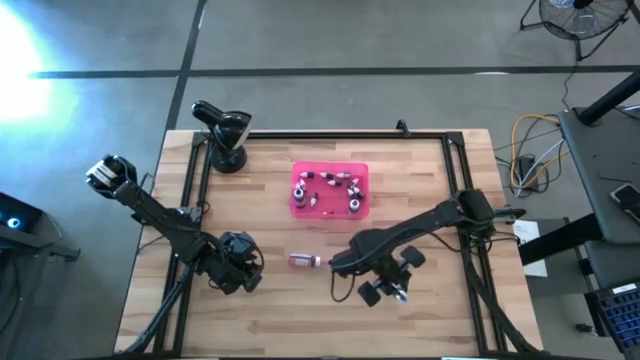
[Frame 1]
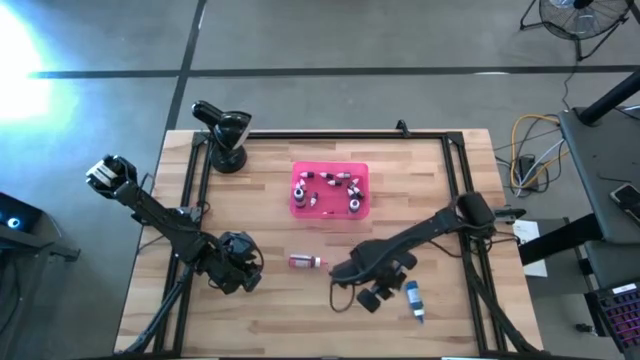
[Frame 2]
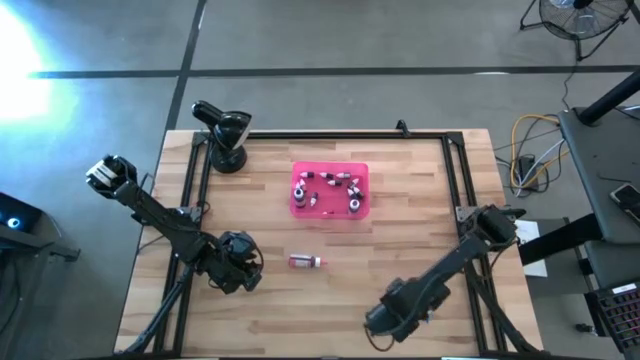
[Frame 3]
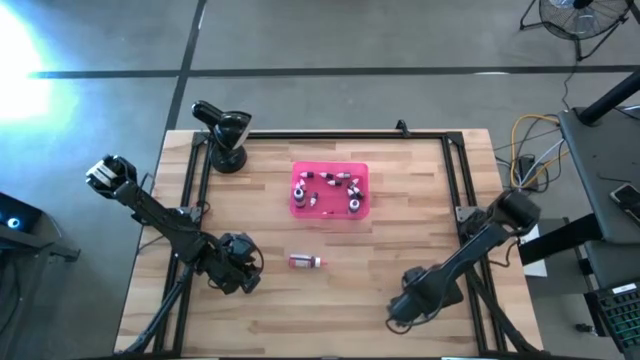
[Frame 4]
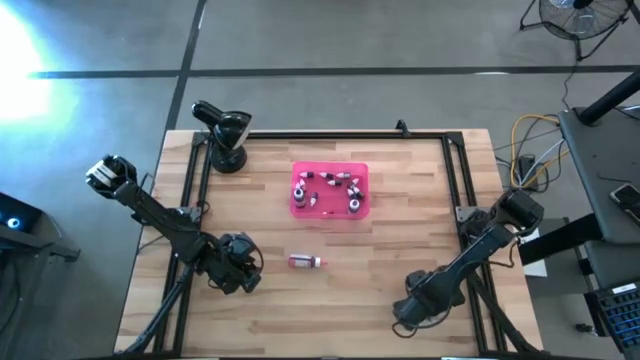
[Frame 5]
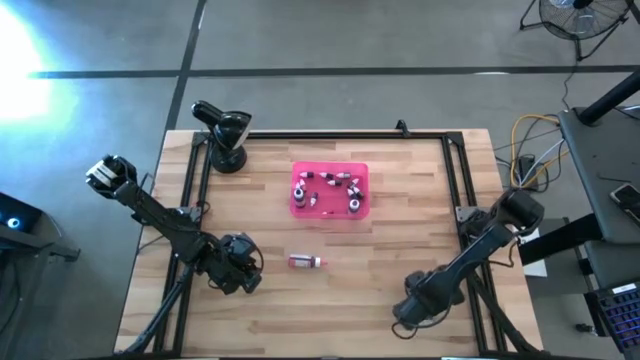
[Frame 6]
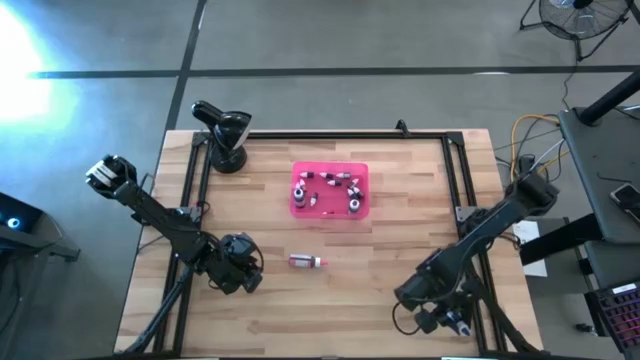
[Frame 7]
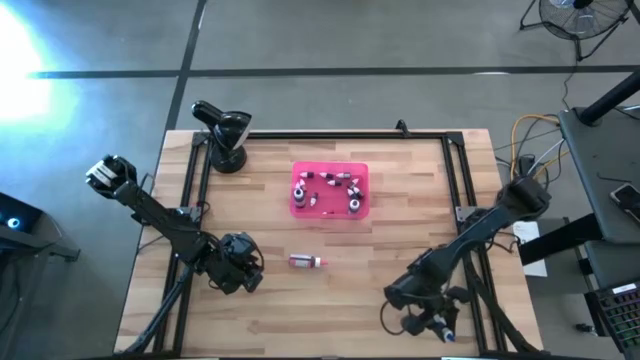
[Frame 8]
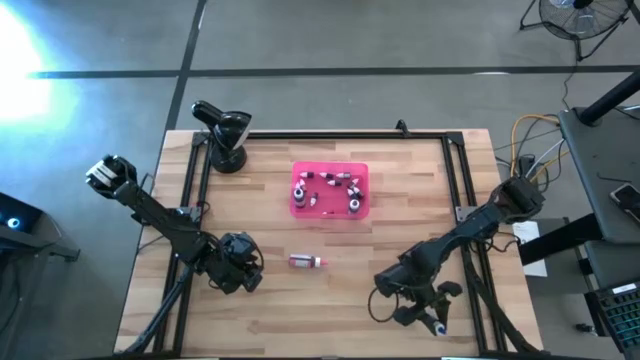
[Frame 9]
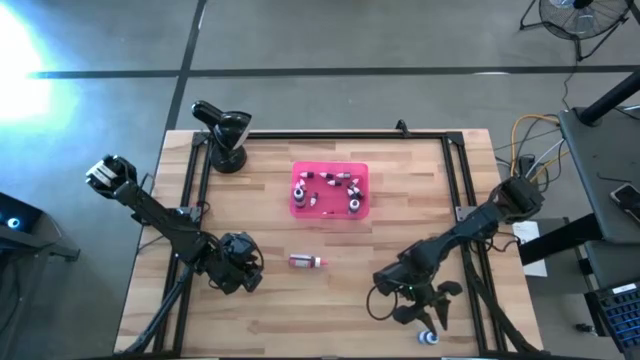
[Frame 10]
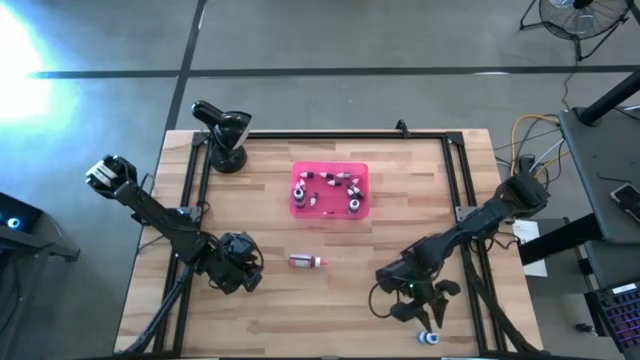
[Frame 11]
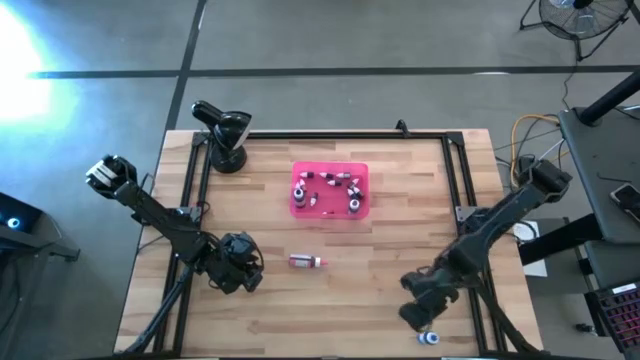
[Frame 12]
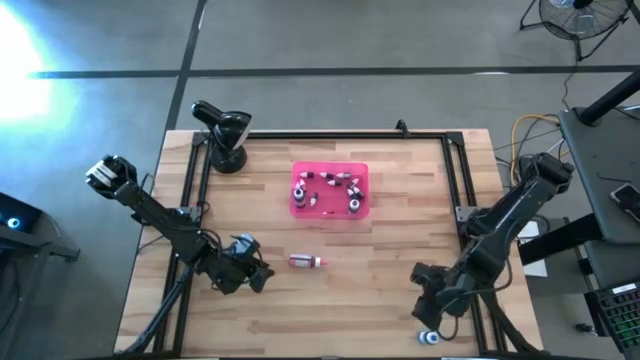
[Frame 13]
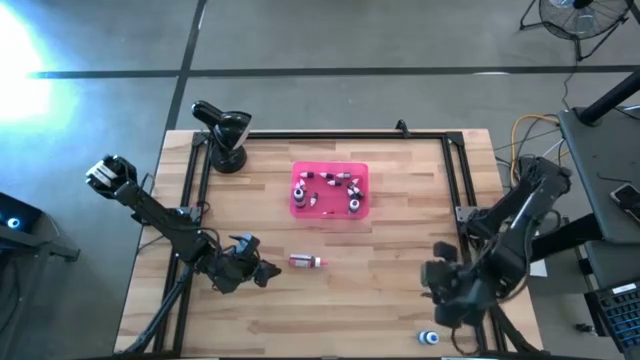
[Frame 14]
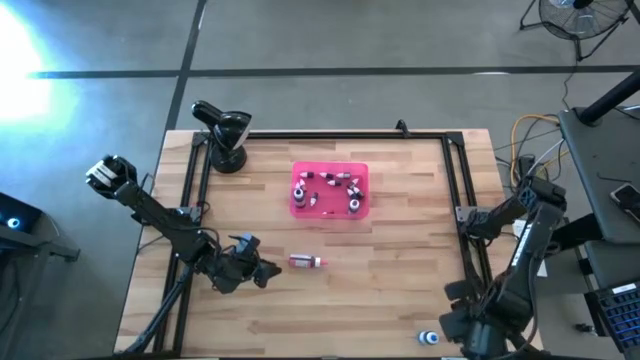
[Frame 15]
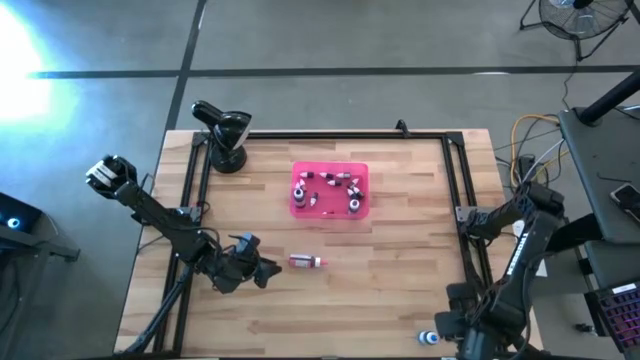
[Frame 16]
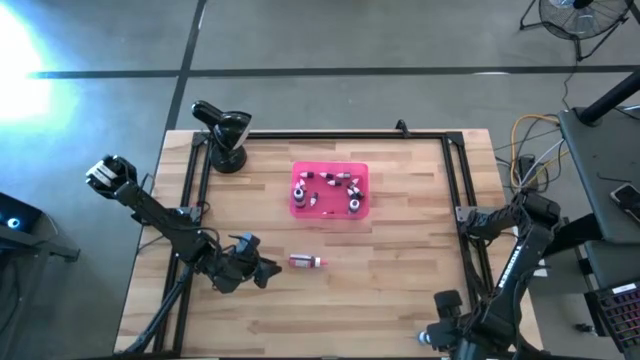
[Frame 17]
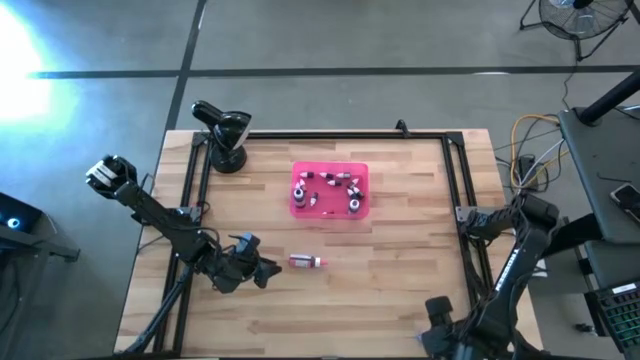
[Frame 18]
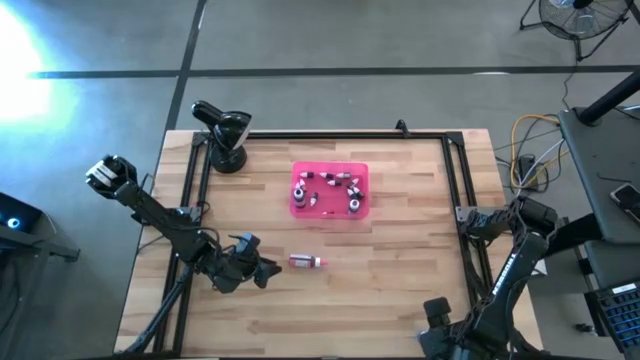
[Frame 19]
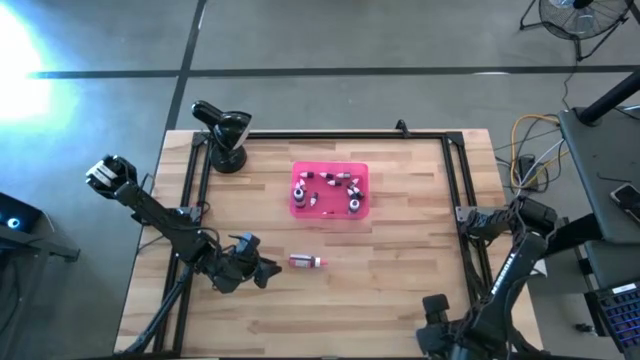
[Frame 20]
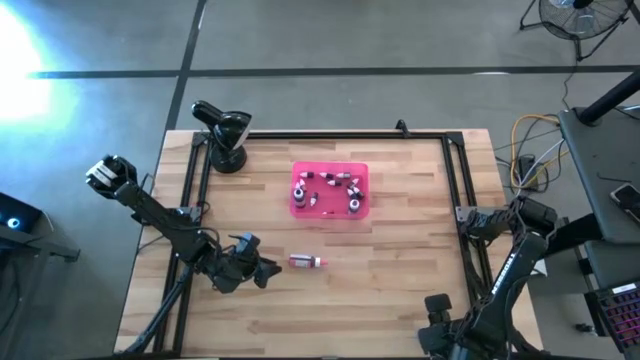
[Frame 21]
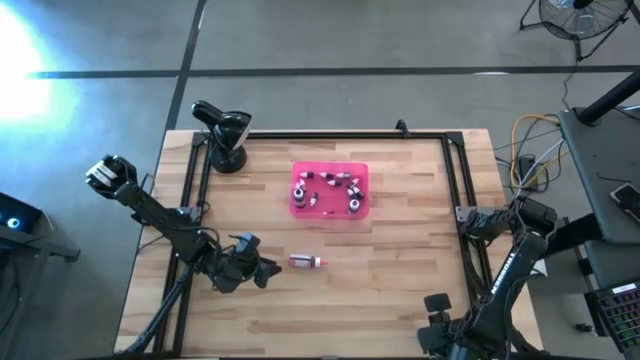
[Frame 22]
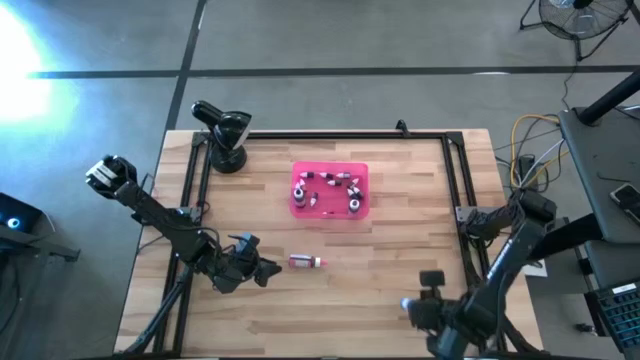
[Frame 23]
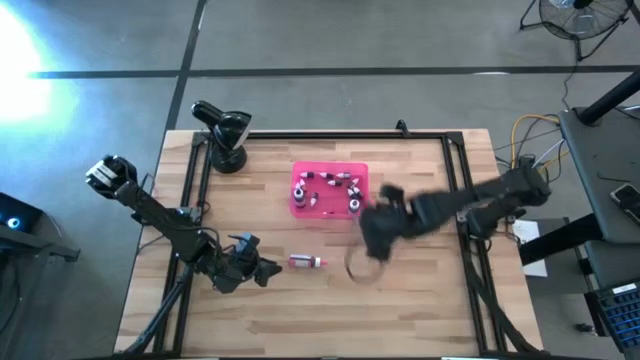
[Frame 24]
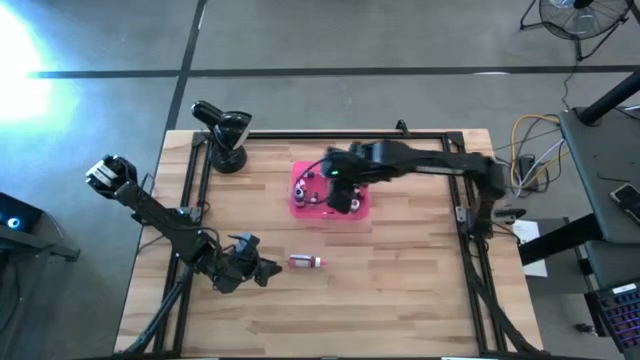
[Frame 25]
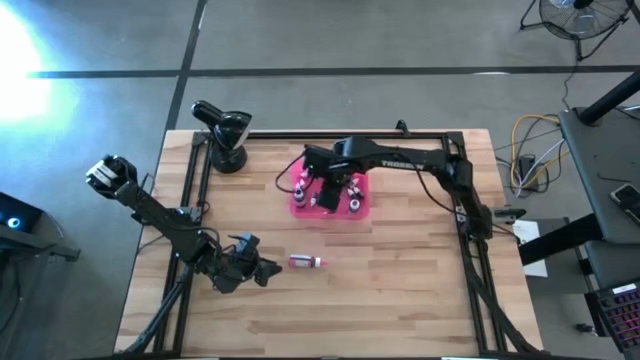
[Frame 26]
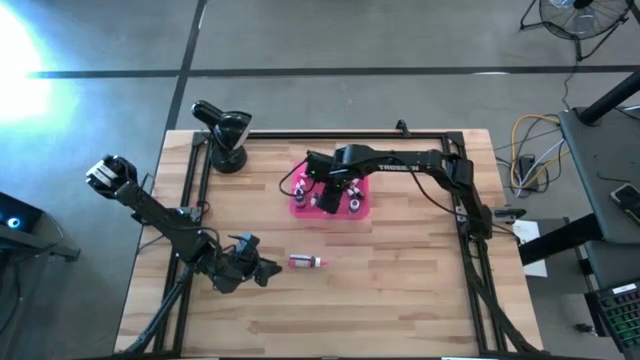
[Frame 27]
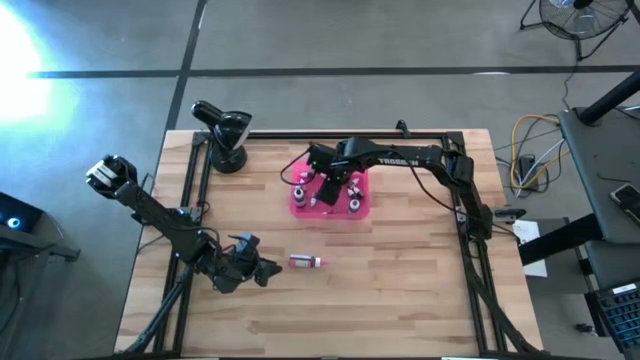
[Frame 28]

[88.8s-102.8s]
Task: Pick & Place food coloring
Put the blue food coloring bottle into the pink bin

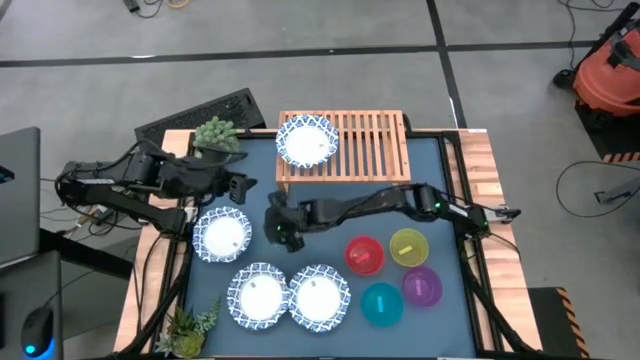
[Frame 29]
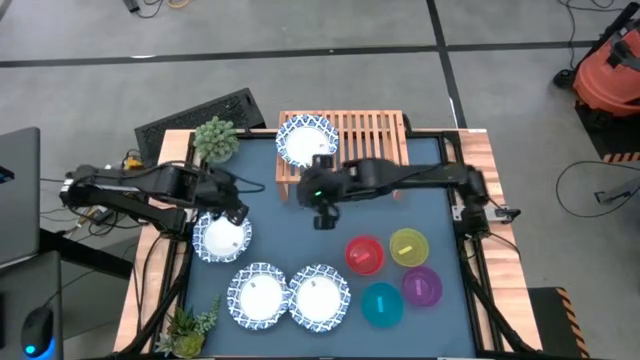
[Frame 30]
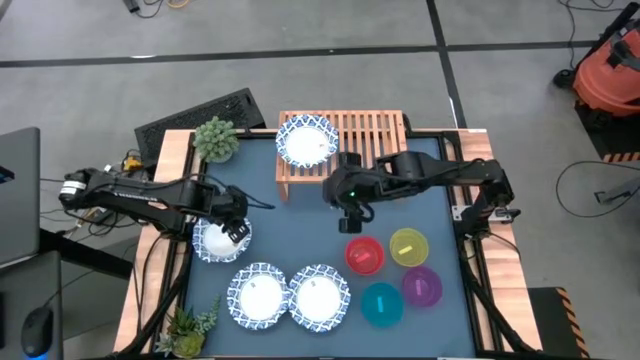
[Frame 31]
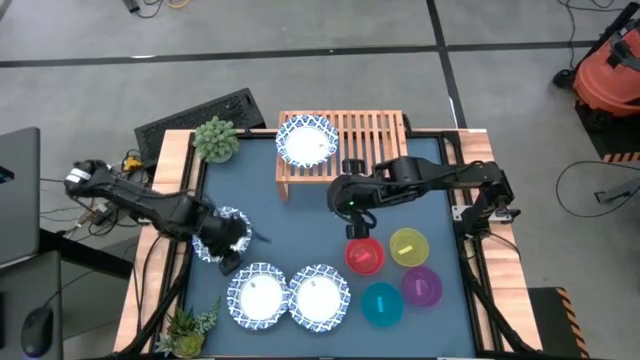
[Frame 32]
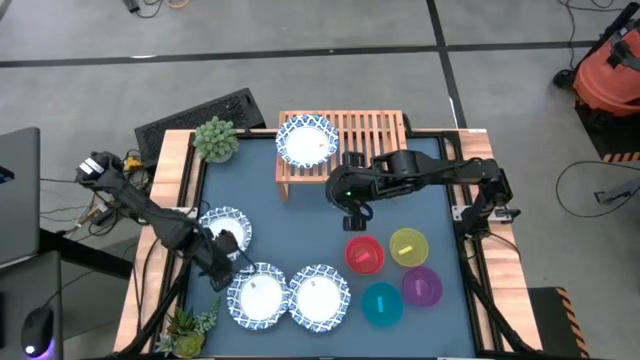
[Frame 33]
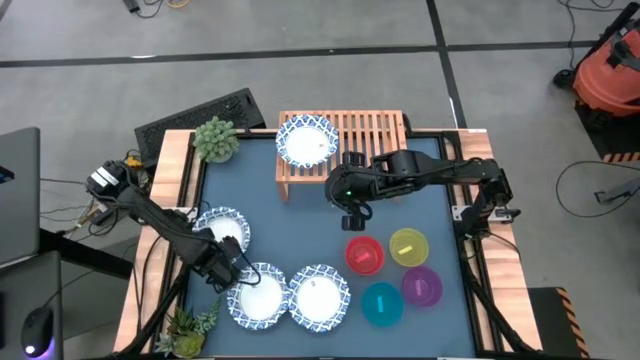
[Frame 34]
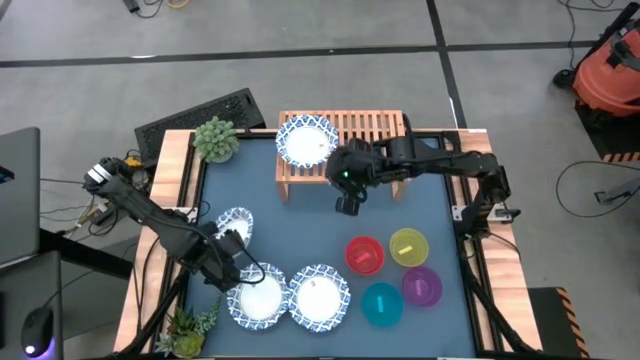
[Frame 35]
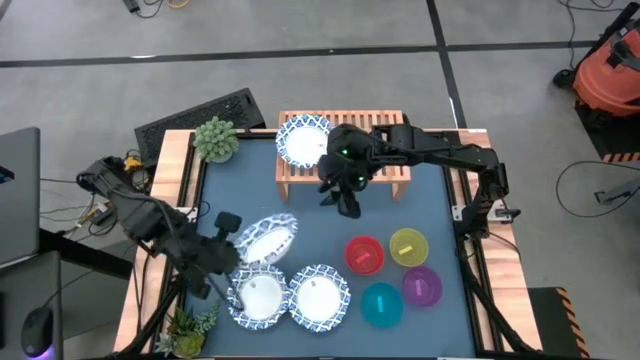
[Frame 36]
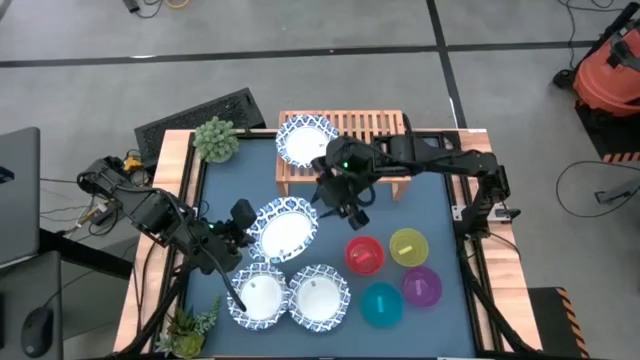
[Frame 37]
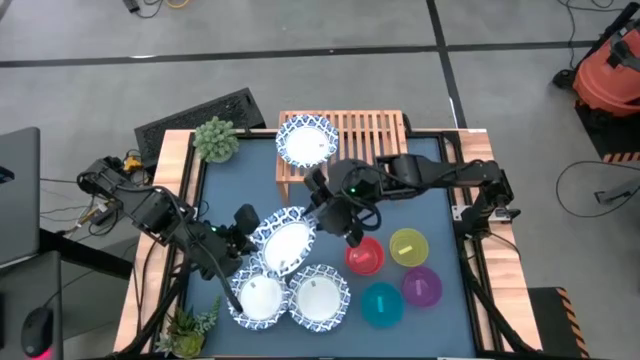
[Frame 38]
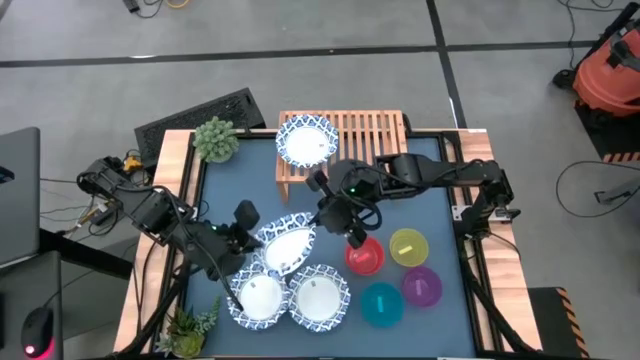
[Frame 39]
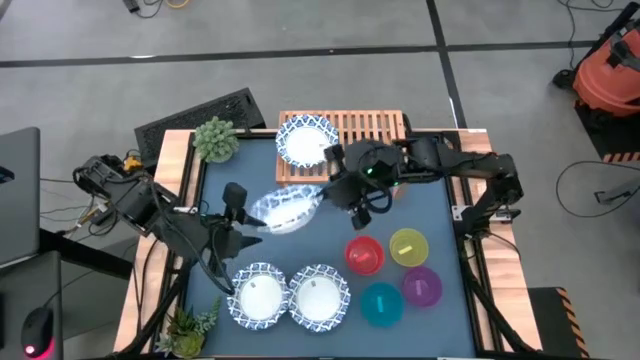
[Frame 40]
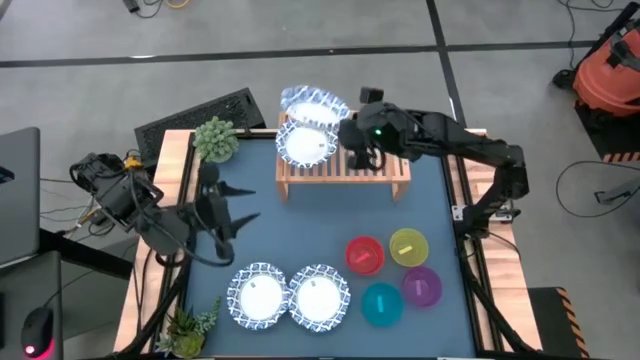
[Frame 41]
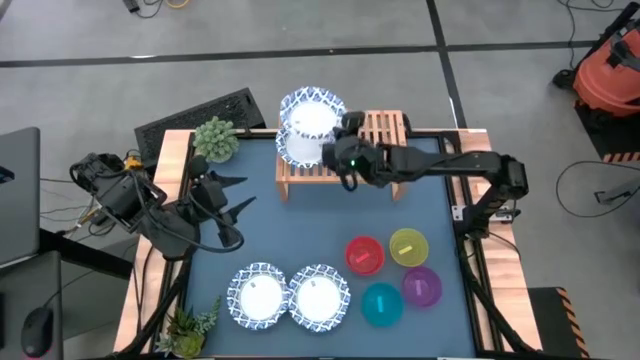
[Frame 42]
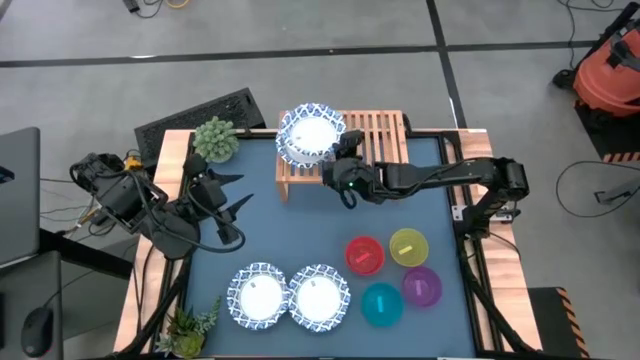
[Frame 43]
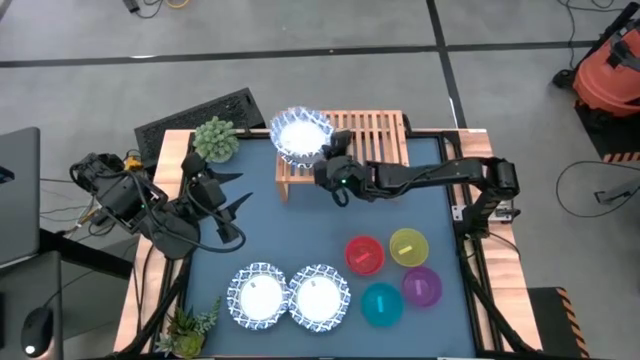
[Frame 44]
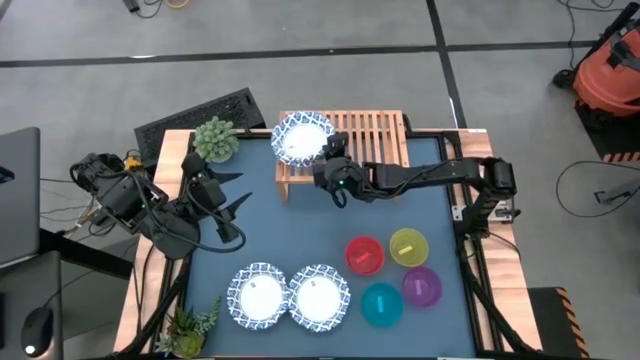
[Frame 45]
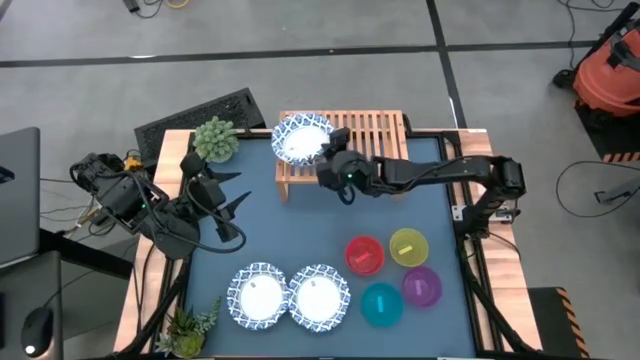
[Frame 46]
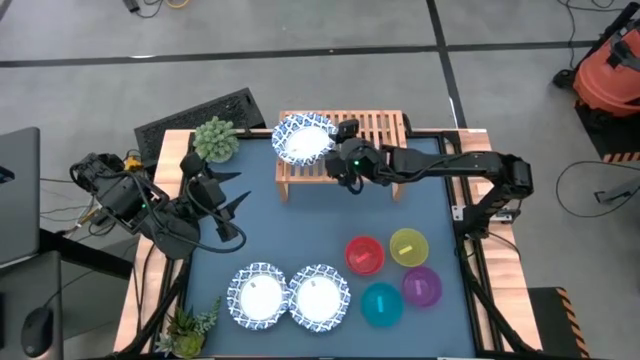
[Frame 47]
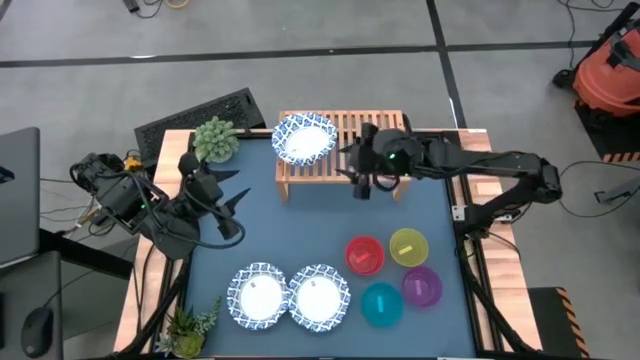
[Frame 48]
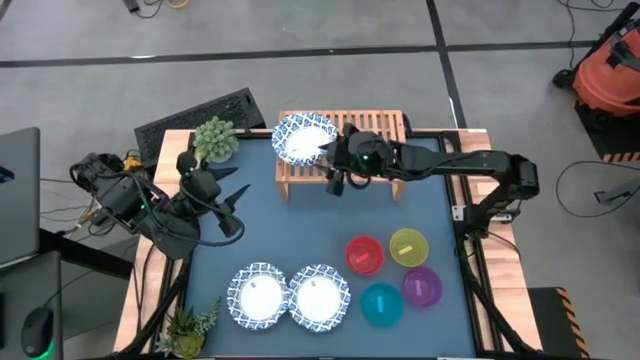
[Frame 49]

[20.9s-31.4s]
Task: Place and stack bowls onto a shelf
Stack the top white patterned bowl on top of the white patterned bowl on the shelf
